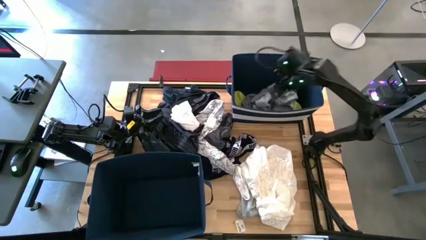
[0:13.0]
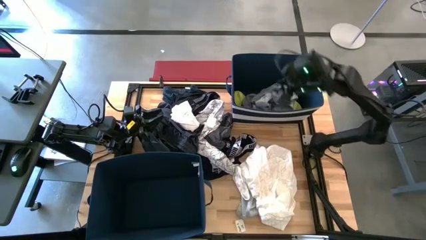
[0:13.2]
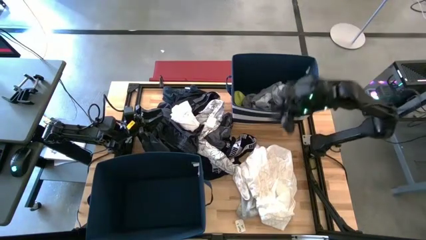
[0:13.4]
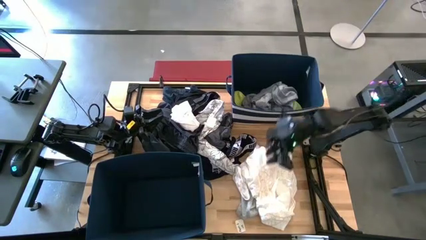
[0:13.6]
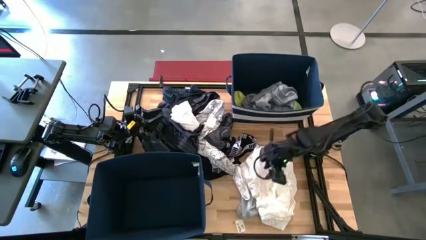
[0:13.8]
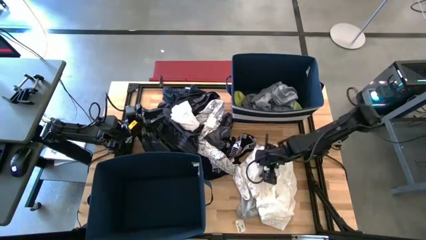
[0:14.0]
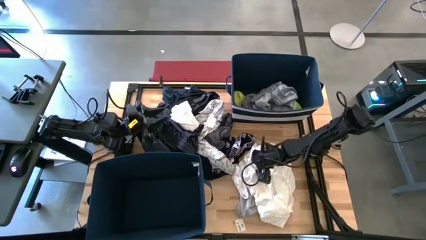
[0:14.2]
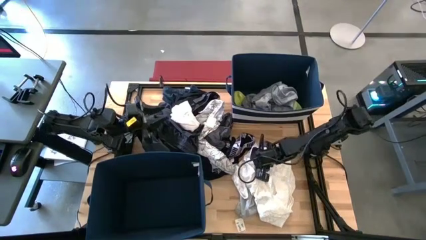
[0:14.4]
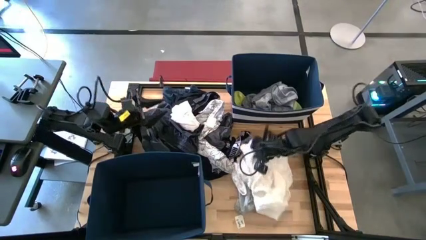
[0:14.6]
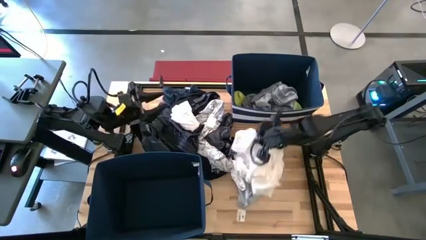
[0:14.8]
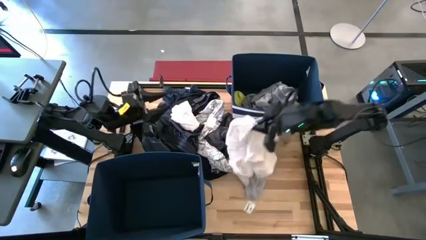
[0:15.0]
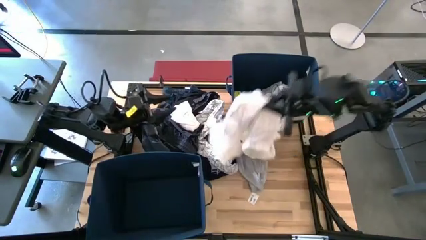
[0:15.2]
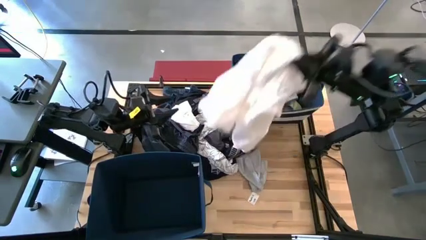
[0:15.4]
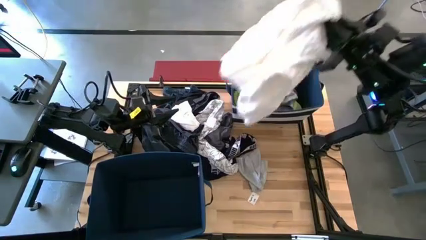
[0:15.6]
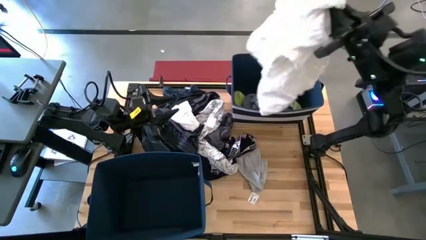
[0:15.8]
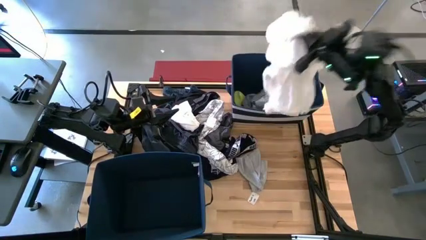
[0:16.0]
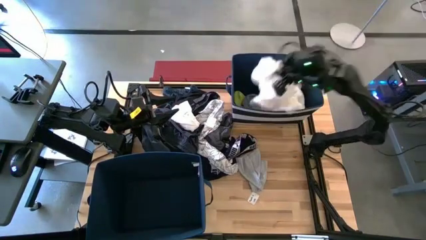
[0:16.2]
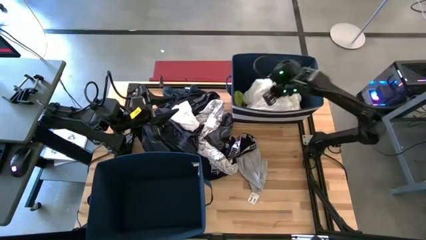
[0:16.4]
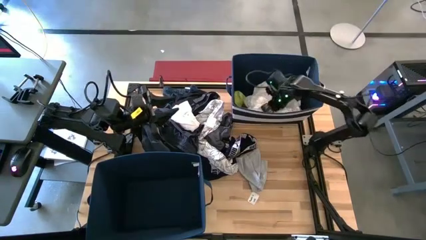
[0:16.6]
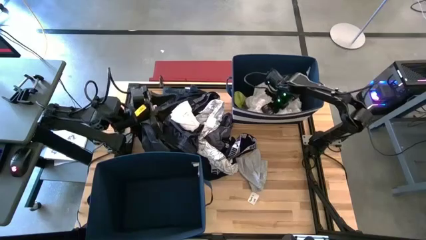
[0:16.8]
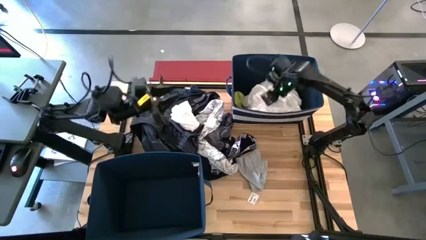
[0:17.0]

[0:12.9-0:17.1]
Task: Sort clothes
Put the white dress into the top blue laundry bin

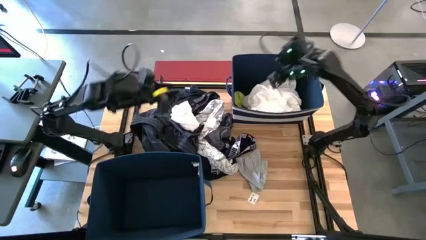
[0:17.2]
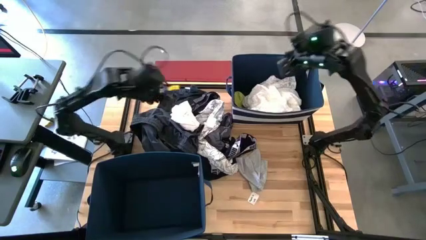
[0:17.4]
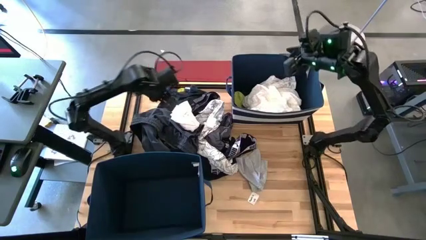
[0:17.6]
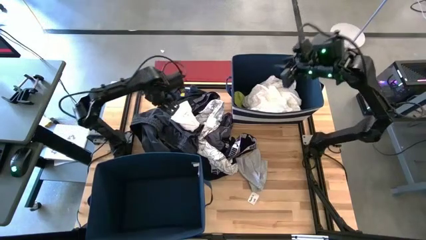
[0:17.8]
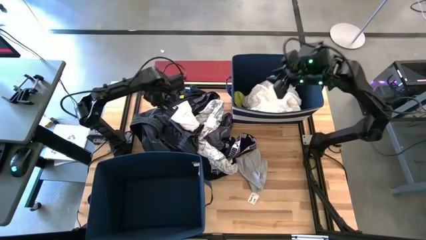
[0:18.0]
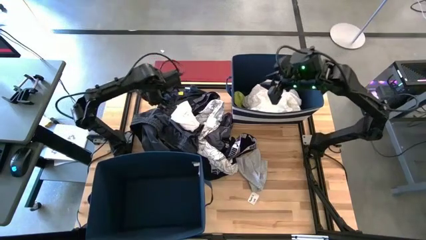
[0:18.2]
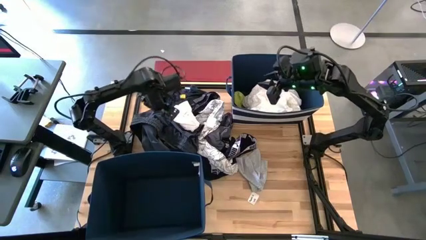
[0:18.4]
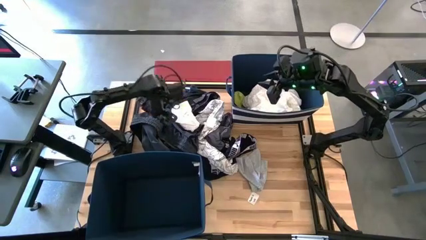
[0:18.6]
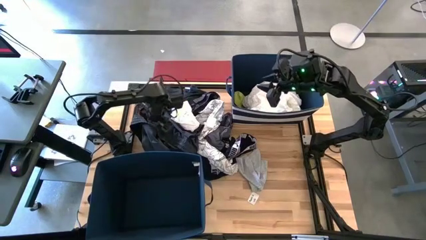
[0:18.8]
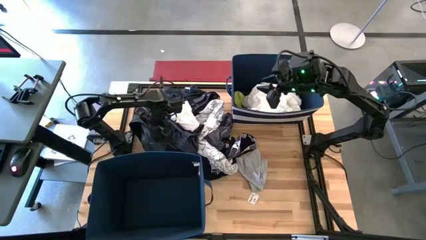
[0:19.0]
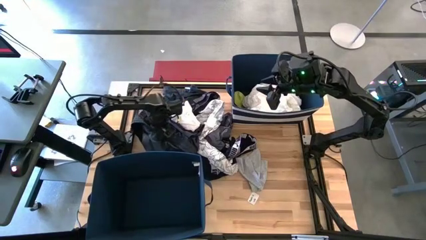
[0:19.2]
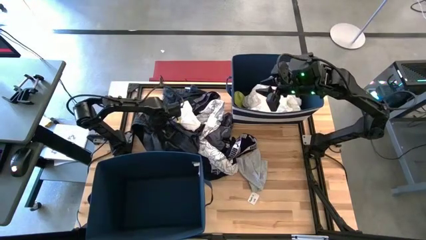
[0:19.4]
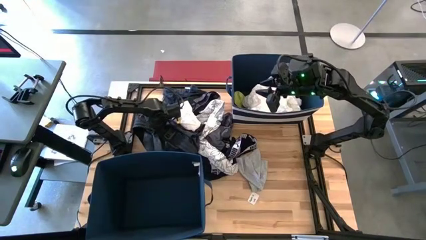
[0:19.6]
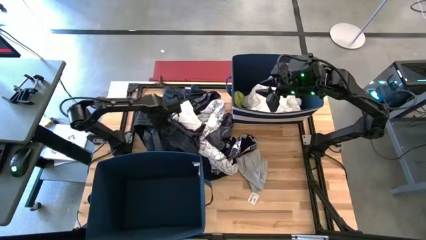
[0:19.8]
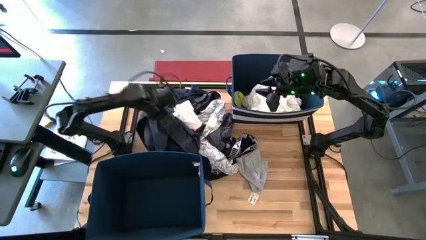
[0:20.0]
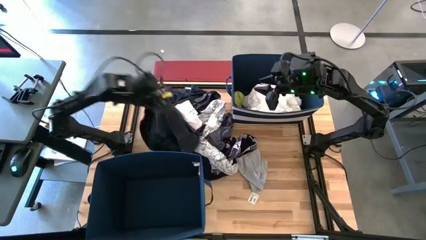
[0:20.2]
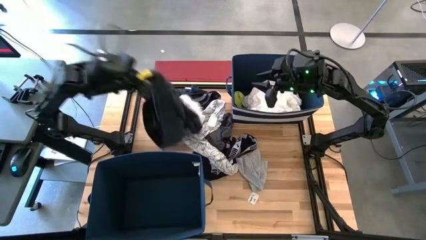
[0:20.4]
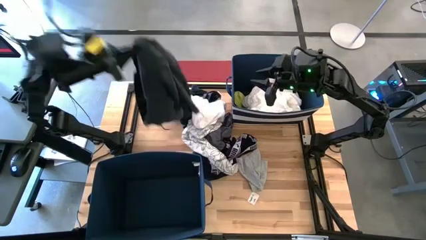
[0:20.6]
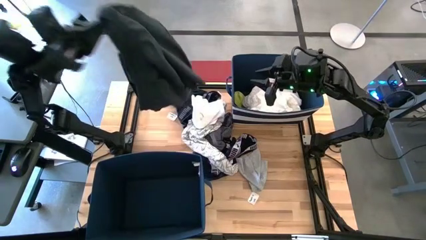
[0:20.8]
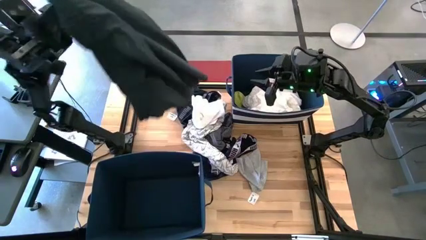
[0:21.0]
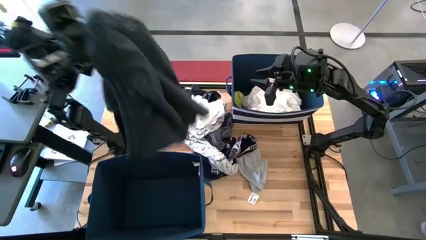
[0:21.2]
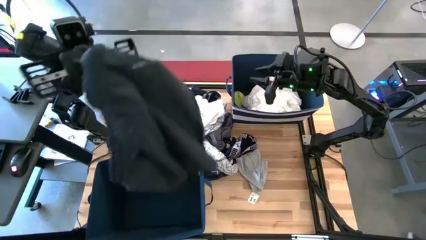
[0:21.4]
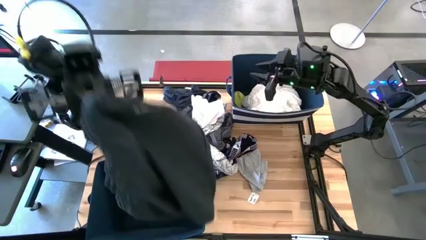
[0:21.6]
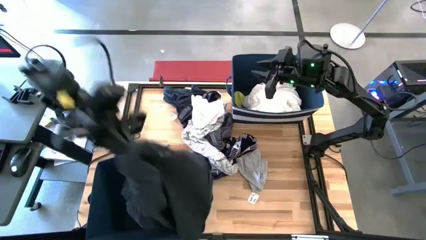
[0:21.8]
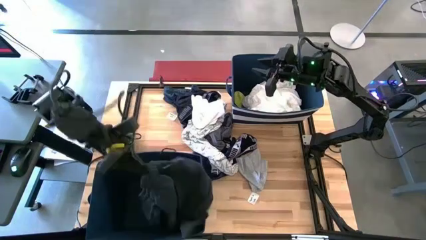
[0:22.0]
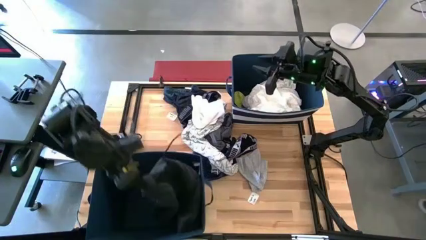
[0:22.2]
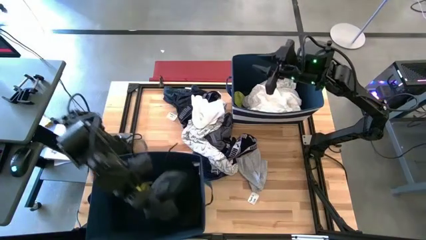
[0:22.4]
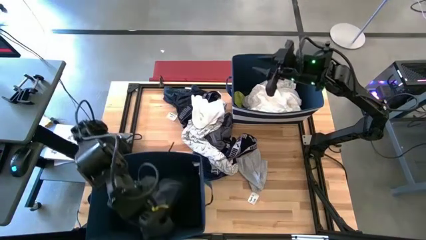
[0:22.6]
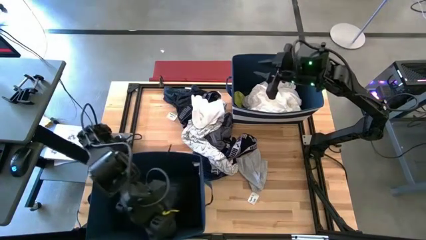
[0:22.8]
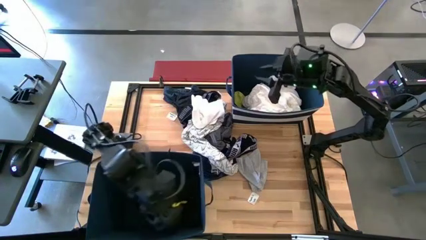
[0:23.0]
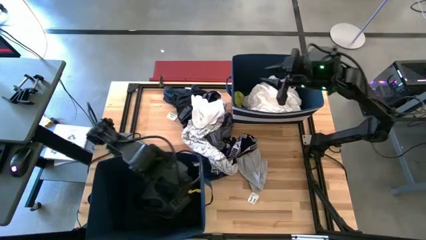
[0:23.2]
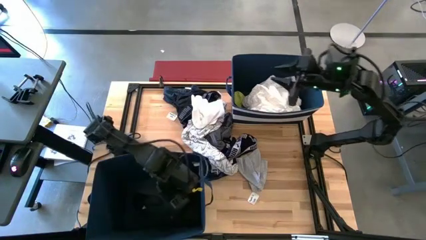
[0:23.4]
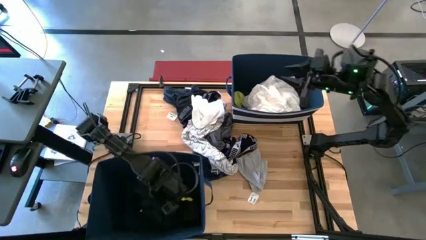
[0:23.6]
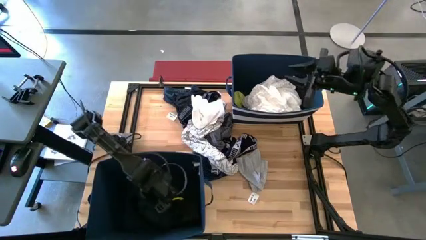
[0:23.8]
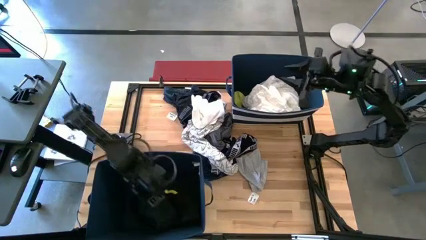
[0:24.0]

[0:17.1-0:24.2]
Put the gray shorts into the bottom blue laundry bin

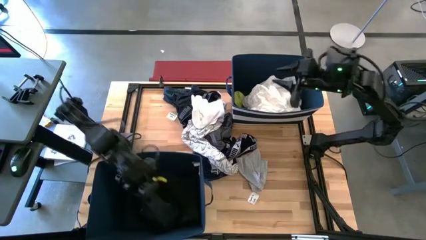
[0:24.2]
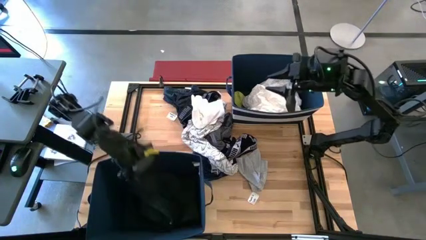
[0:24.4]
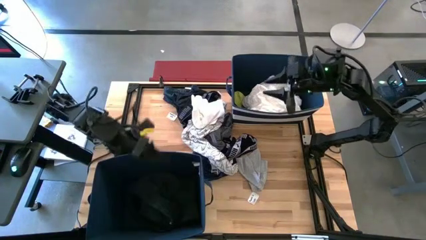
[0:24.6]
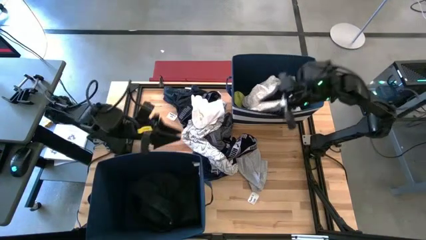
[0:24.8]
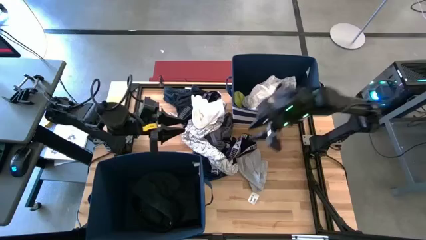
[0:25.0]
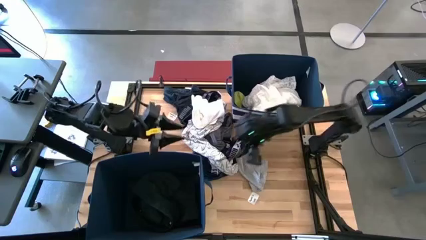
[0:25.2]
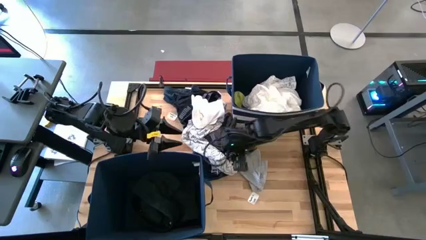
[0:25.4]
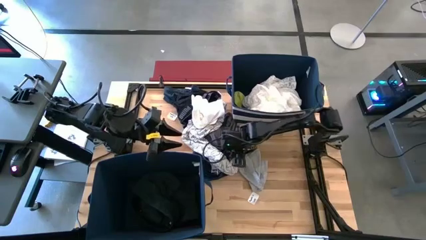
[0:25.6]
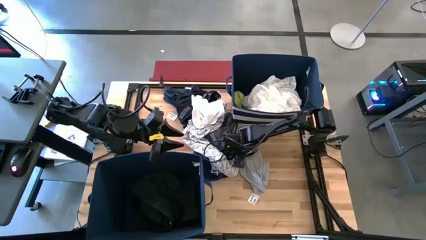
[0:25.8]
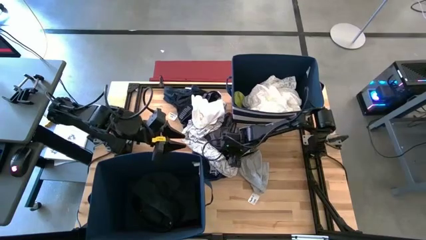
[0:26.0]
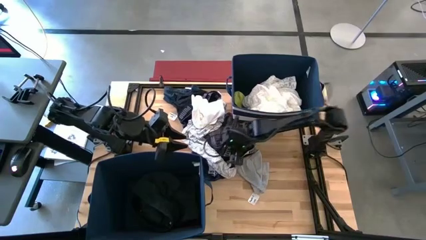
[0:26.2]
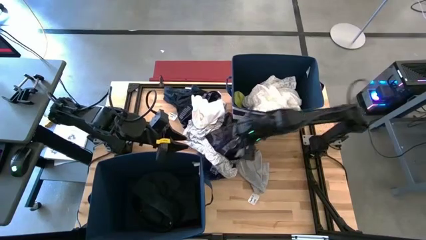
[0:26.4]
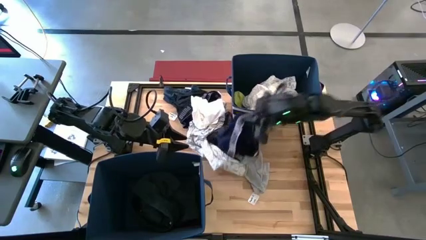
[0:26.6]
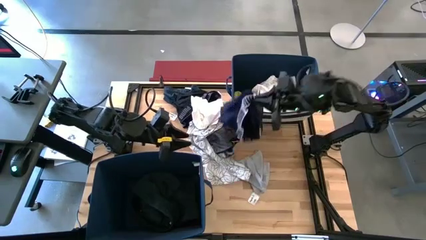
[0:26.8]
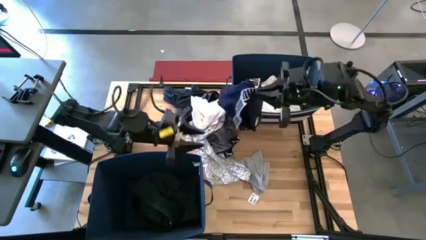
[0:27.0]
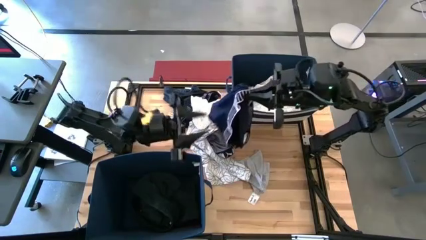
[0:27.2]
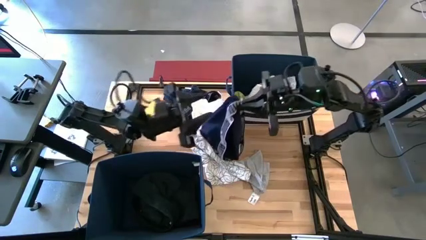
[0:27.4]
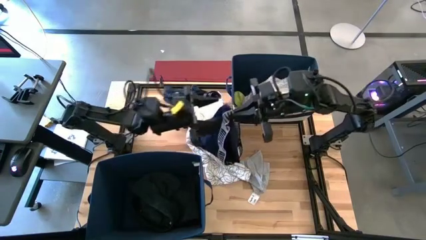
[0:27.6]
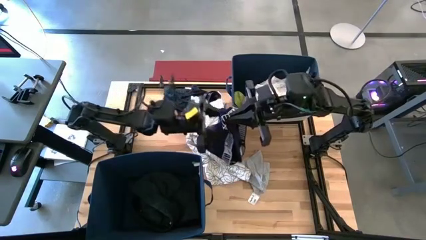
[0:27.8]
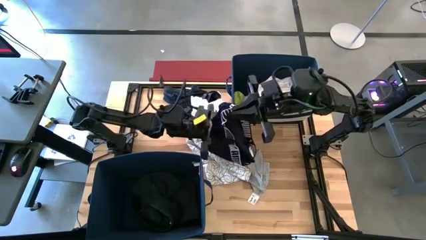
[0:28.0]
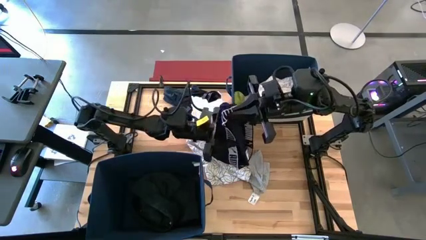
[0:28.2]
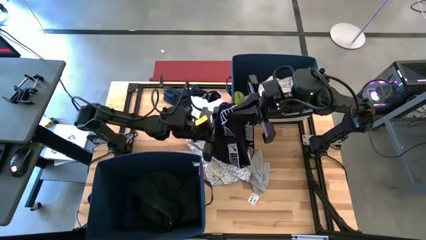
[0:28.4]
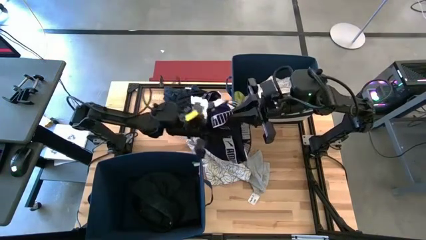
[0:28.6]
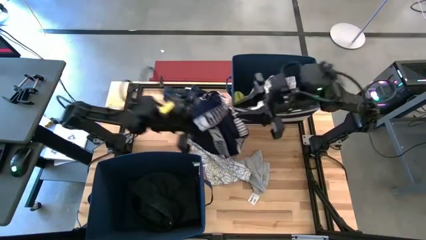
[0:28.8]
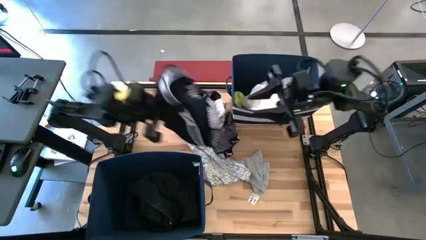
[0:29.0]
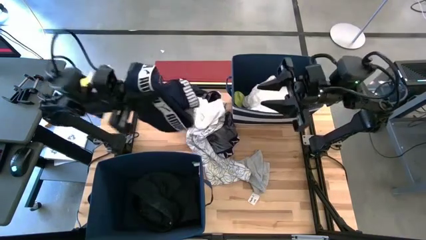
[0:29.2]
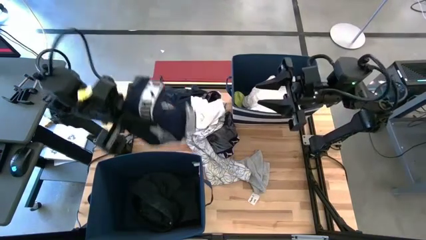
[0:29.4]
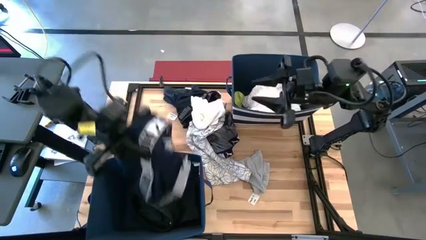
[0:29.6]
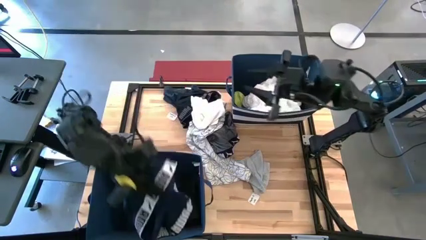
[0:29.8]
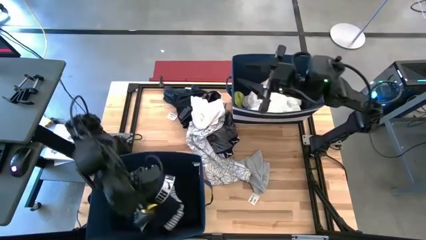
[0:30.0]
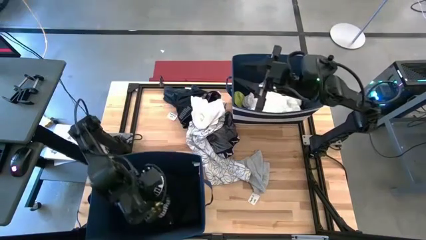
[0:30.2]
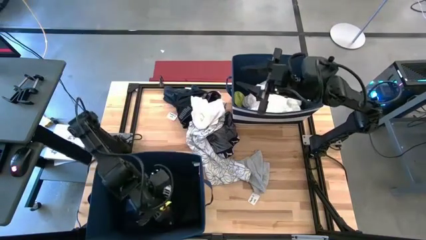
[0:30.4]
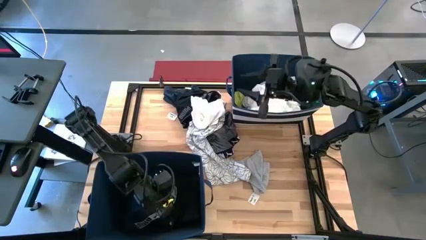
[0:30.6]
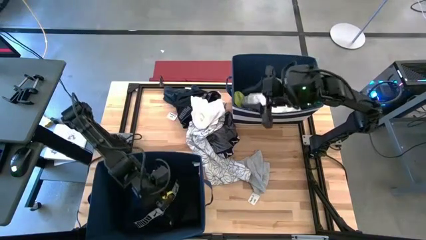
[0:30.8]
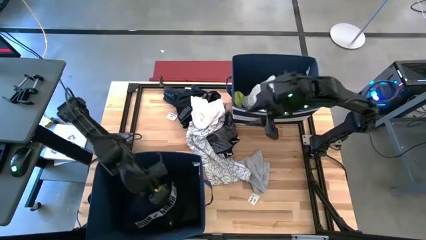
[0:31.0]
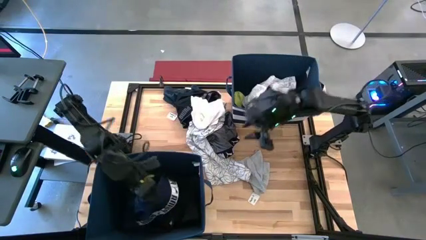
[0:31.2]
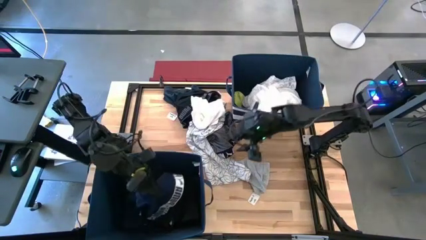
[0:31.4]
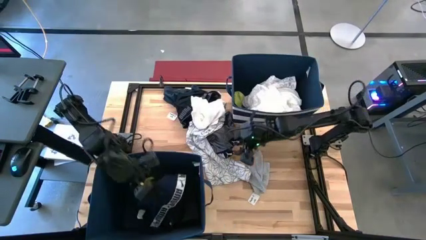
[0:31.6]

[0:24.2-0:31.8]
Put the blue underwear into the bottom blue laundry bin
